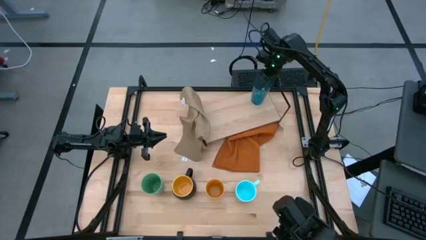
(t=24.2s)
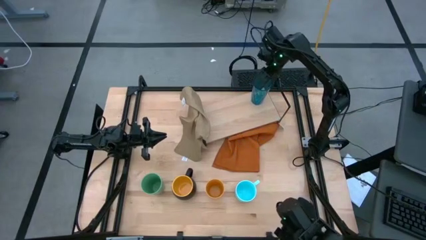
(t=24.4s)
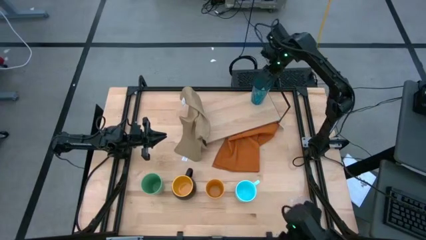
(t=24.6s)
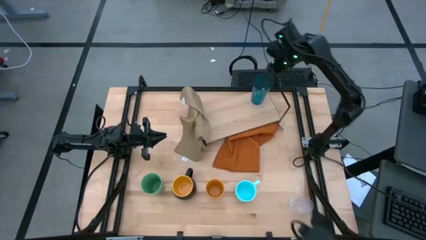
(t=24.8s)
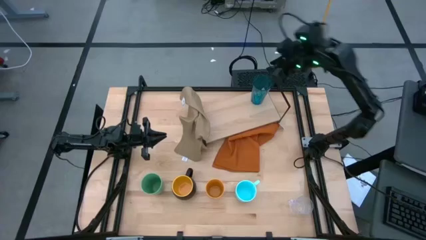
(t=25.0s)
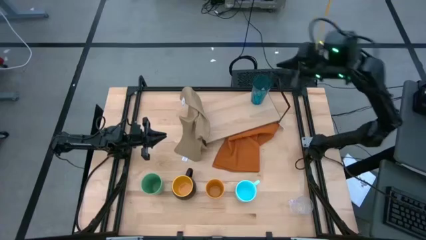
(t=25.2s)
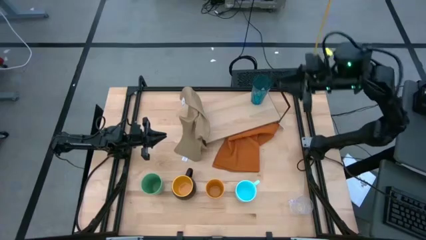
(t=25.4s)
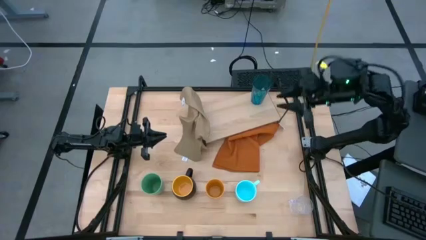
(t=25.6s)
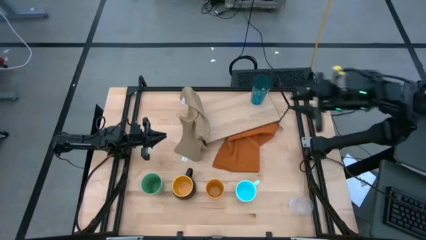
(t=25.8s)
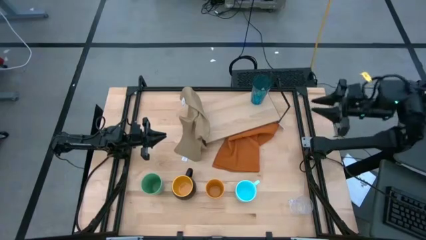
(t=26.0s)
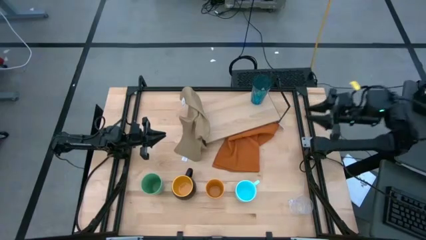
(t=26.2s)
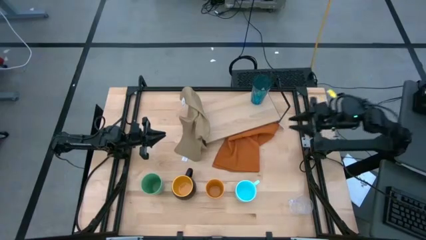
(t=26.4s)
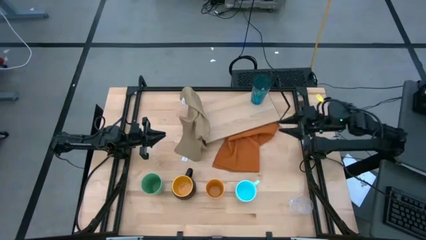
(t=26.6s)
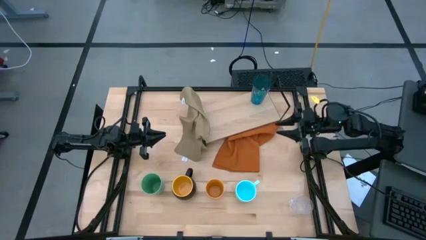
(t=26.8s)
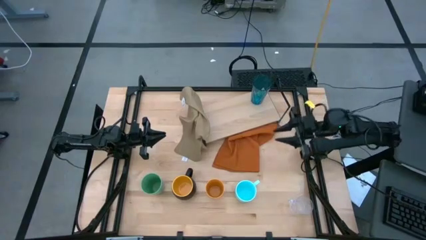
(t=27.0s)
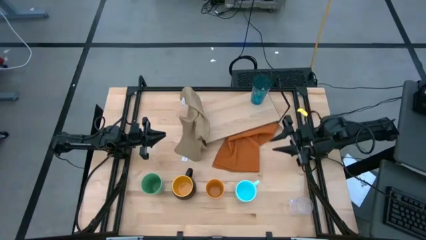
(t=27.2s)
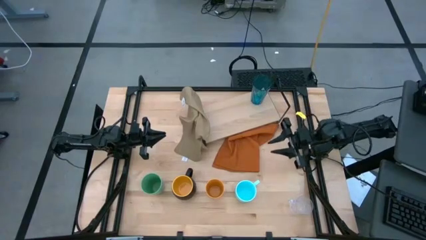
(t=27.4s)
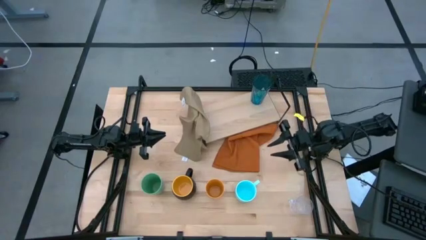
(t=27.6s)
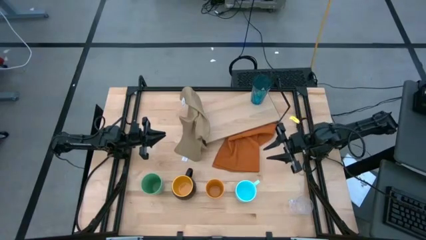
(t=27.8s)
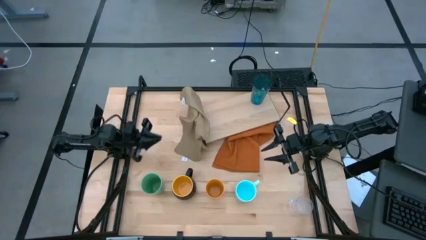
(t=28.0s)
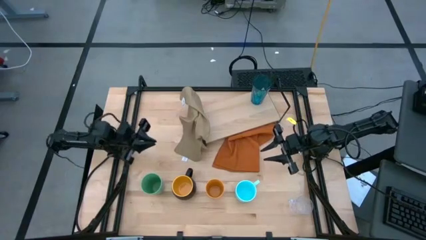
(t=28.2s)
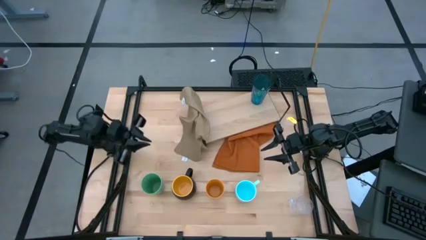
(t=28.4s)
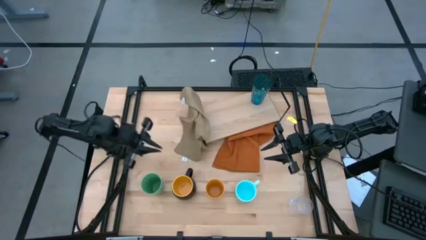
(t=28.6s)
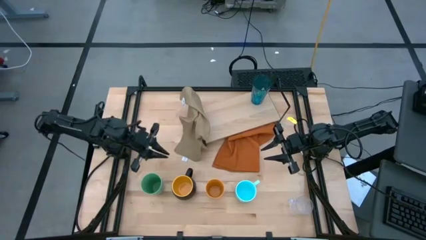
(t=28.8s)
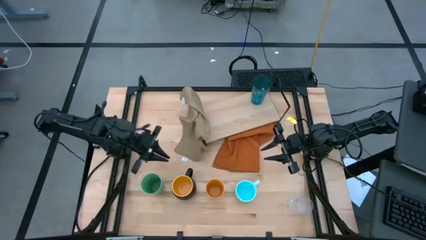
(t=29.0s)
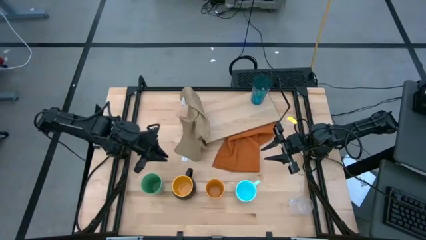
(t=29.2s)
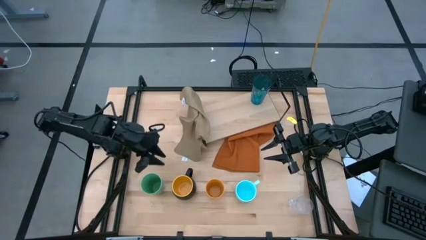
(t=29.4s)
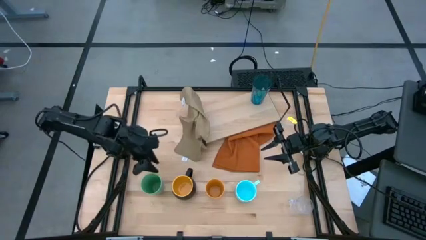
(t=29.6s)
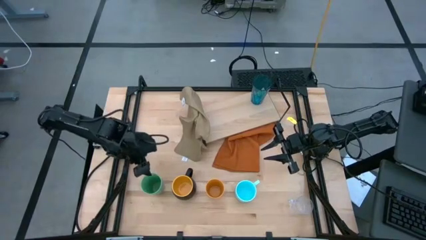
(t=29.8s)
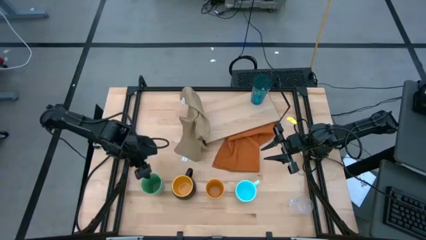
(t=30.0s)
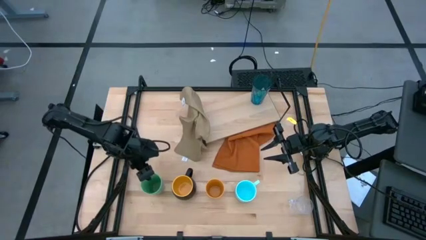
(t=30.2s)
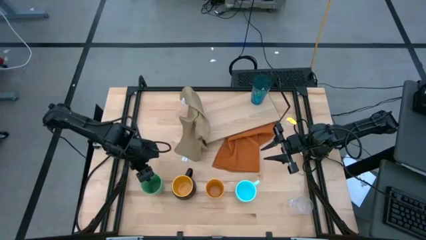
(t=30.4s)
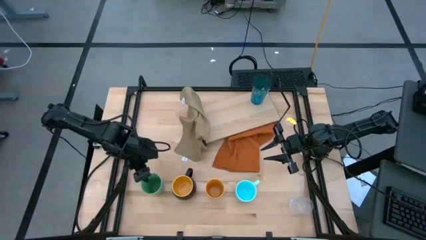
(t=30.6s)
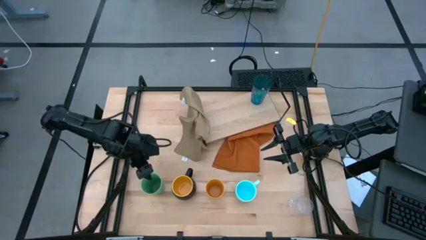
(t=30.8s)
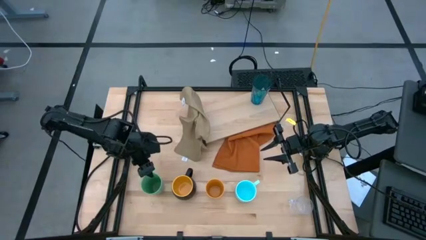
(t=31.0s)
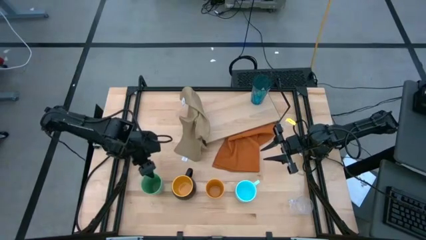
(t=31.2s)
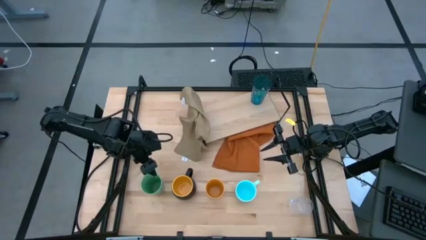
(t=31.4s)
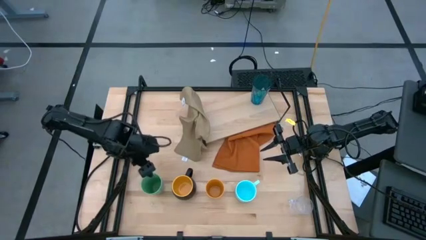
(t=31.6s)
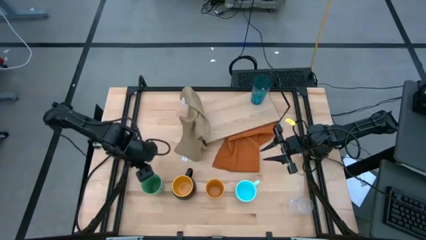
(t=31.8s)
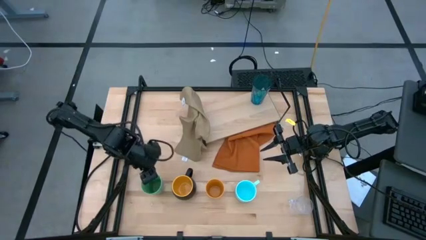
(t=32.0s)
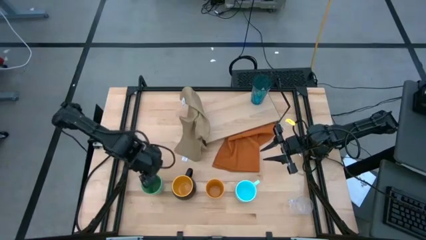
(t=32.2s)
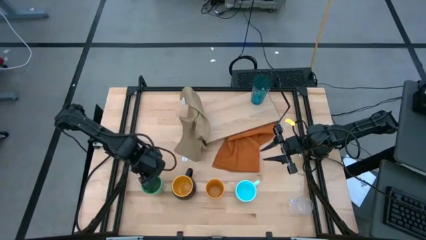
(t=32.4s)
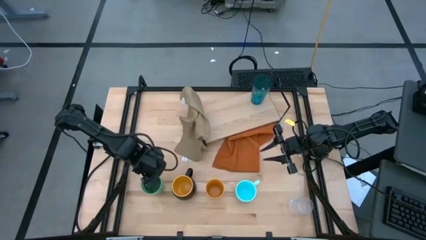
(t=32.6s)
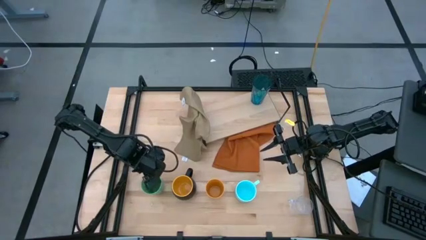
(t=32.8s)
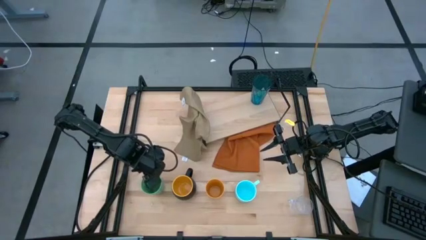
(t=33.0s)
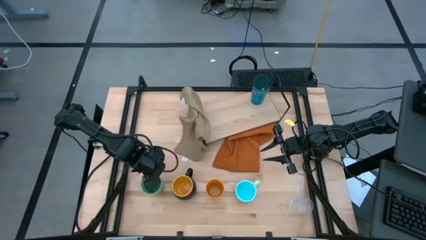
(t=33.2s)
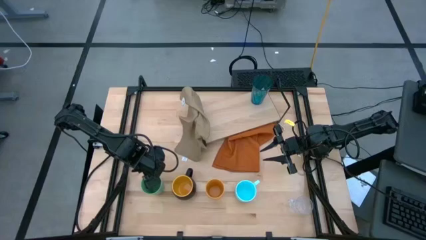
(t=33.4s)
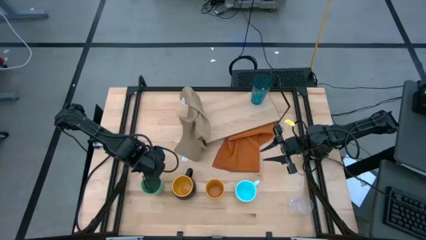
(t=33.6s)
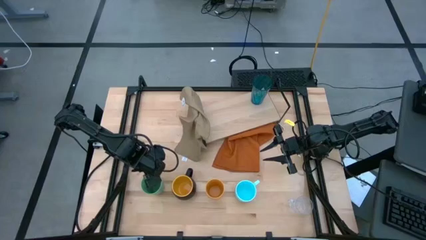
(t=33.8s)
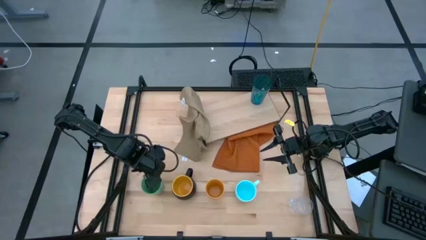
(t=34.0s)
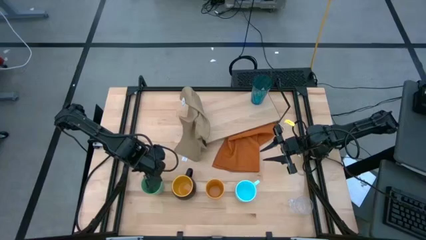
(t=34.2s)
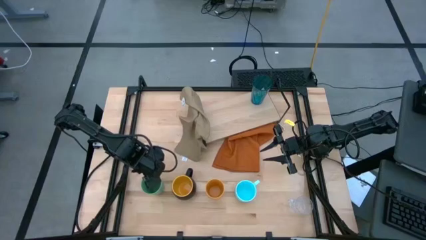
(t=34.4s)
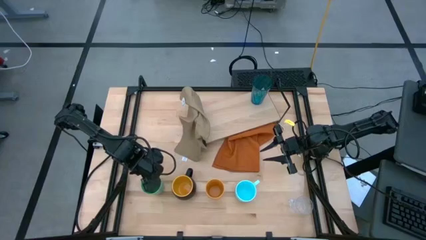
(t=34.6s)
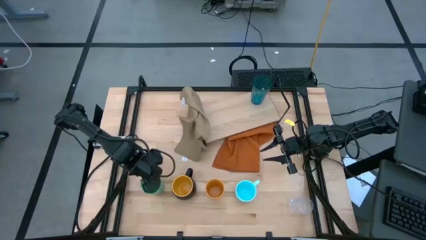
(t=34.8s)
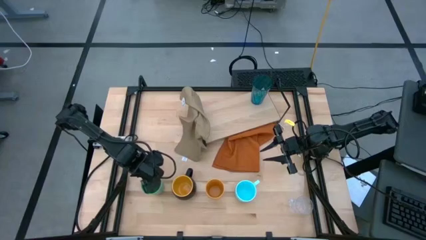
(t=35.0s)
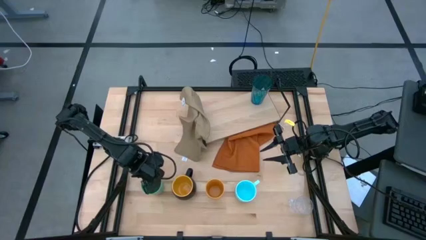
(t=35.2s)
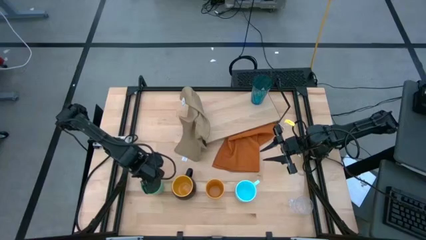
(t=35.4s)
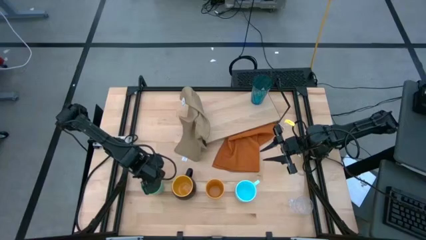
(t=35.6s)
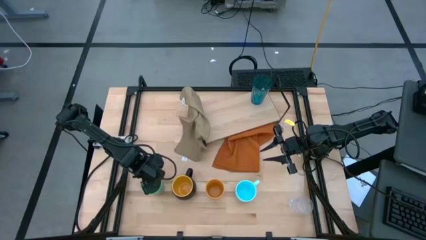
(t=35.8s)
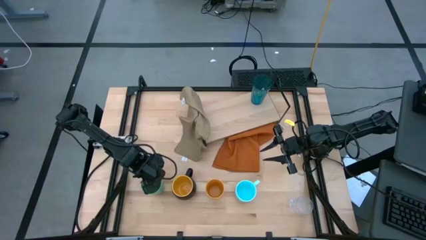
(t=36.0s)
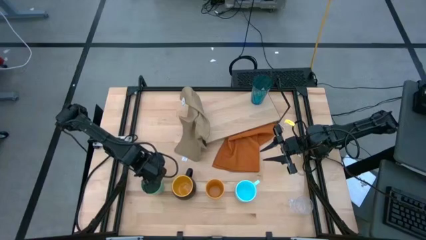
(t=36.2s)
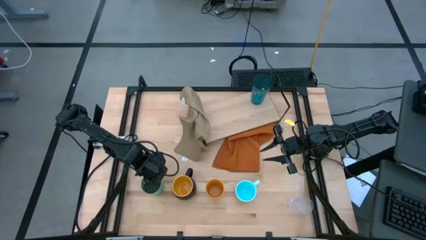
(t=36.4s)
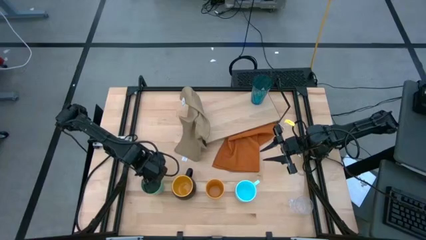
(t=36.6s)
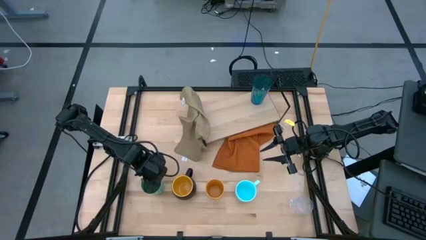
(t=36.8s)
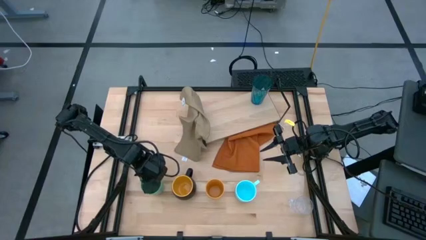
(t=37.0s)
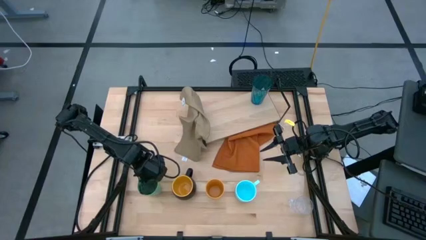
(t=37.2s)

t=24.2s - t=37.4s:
Task: Stack small to large cups/mugs on shelf
Put the green cup on the shelf
